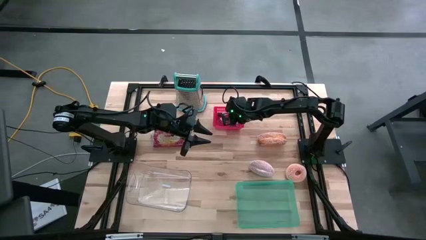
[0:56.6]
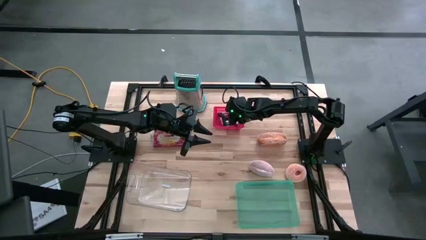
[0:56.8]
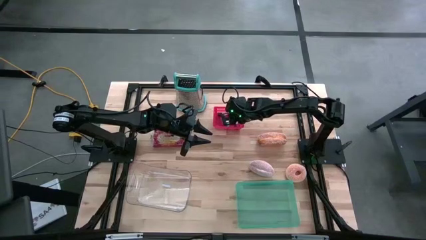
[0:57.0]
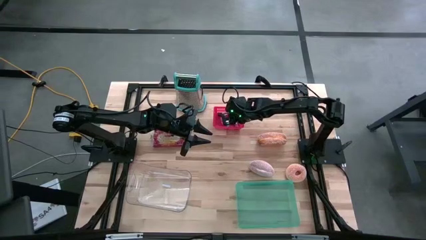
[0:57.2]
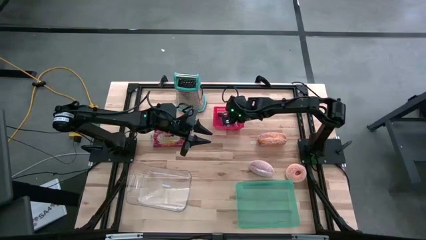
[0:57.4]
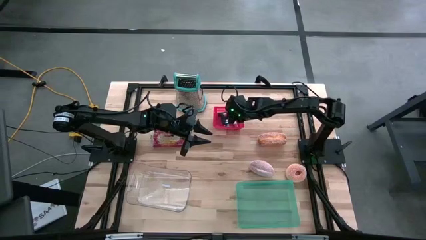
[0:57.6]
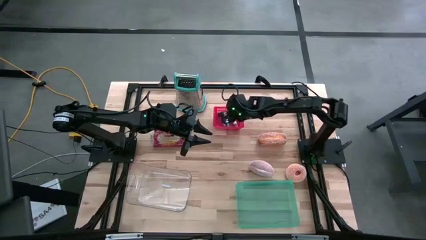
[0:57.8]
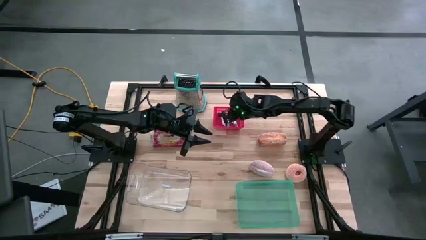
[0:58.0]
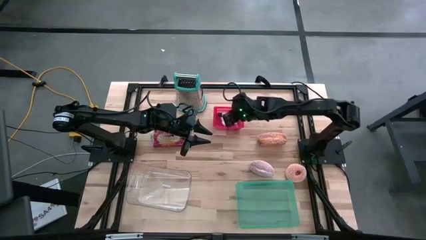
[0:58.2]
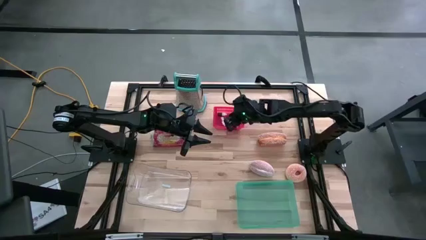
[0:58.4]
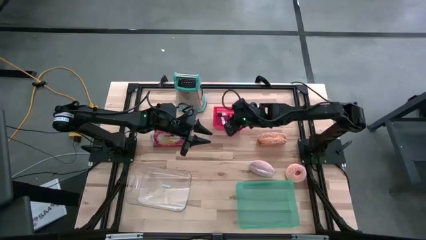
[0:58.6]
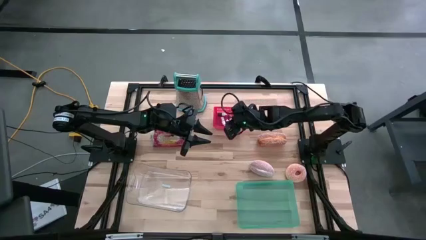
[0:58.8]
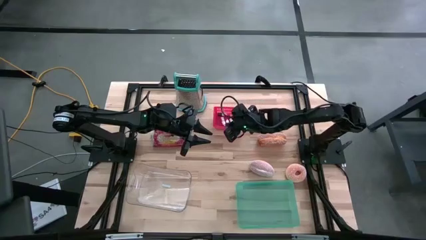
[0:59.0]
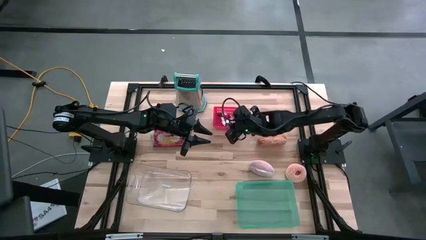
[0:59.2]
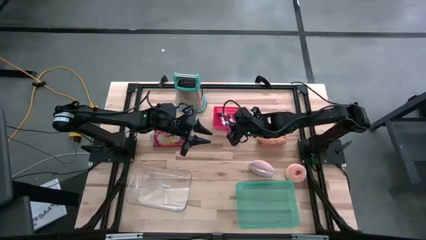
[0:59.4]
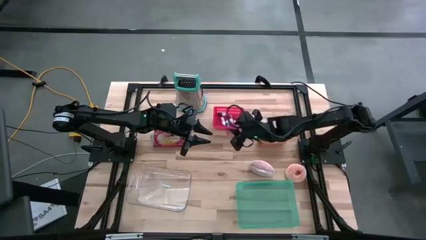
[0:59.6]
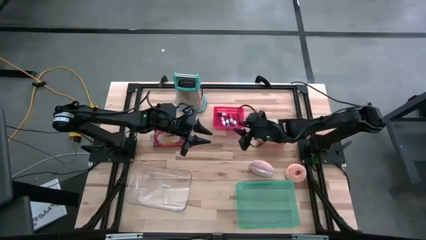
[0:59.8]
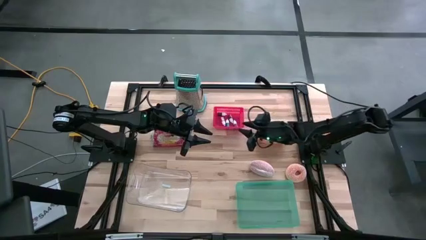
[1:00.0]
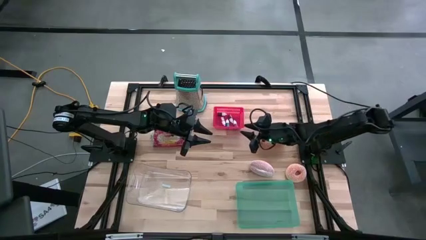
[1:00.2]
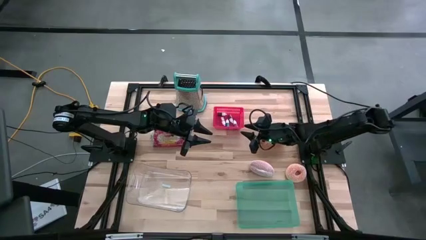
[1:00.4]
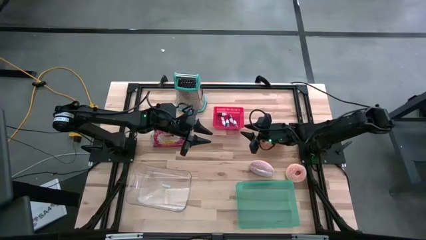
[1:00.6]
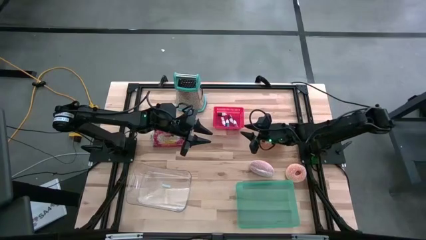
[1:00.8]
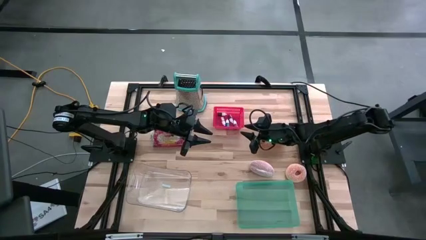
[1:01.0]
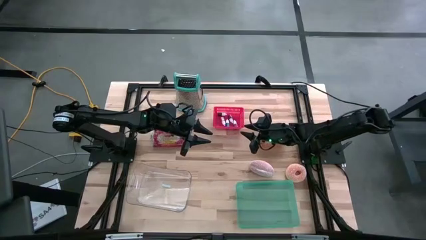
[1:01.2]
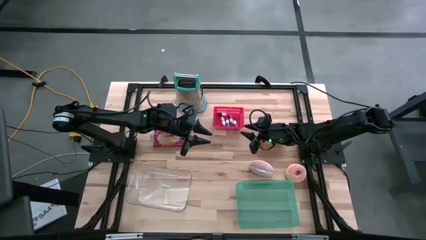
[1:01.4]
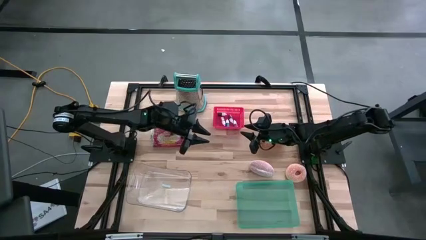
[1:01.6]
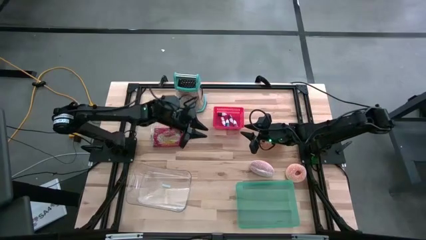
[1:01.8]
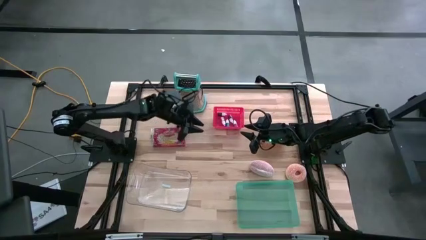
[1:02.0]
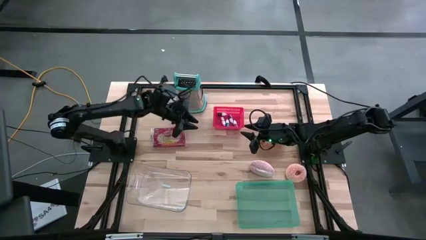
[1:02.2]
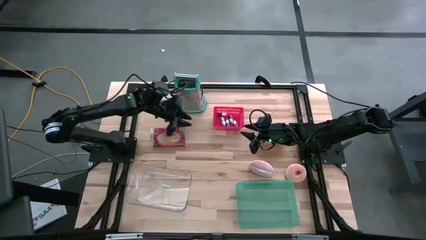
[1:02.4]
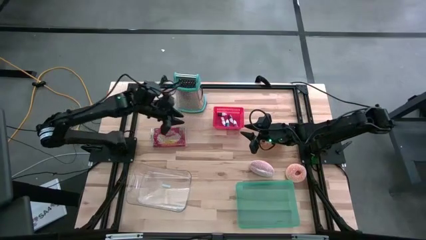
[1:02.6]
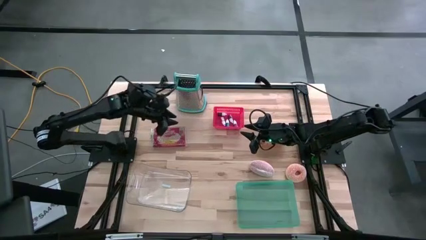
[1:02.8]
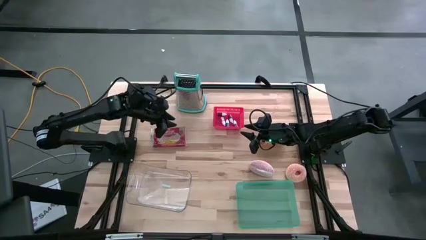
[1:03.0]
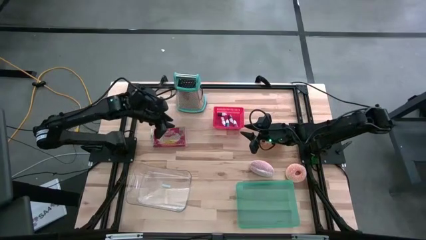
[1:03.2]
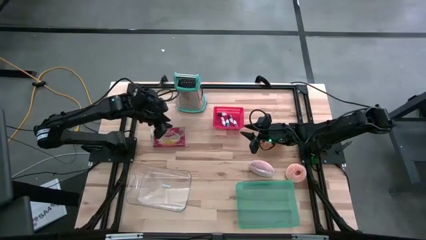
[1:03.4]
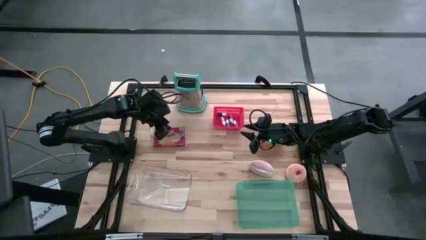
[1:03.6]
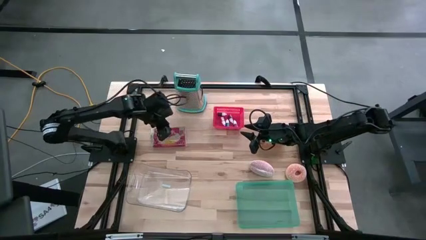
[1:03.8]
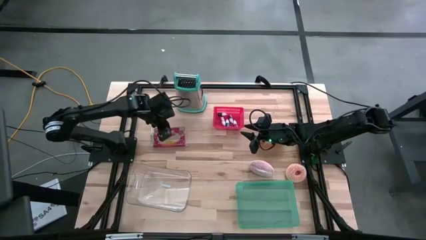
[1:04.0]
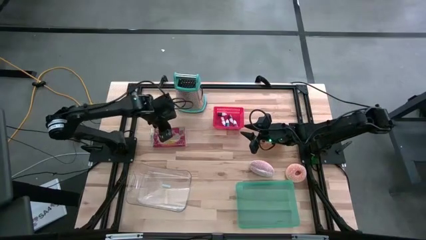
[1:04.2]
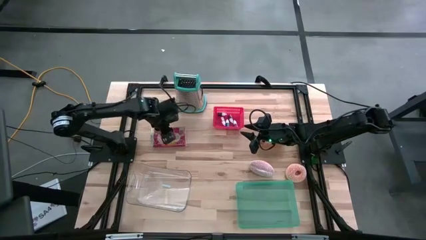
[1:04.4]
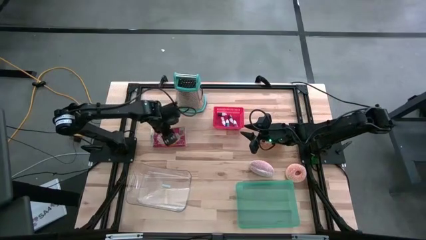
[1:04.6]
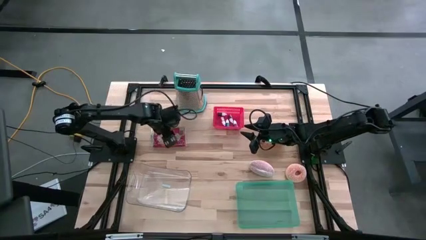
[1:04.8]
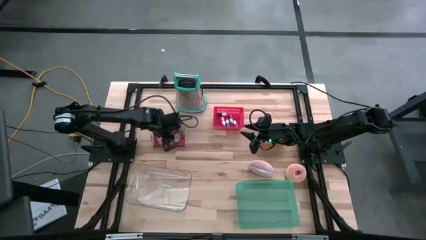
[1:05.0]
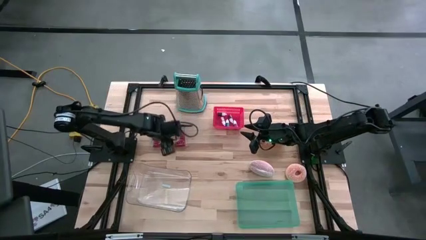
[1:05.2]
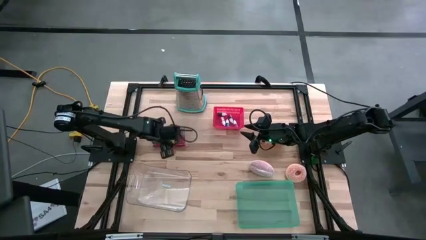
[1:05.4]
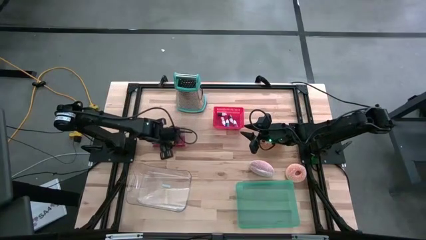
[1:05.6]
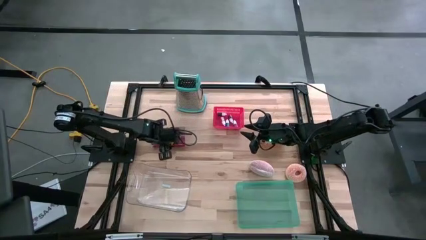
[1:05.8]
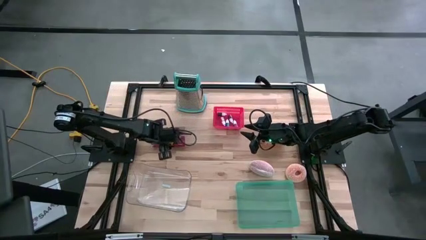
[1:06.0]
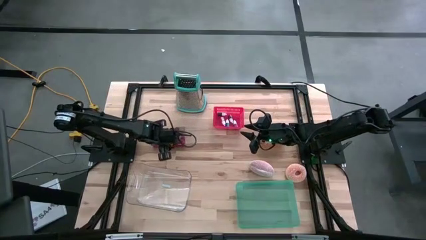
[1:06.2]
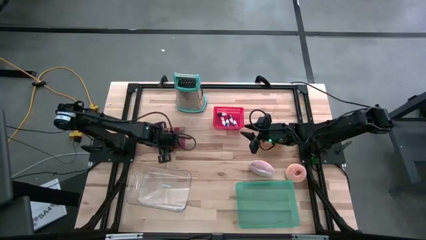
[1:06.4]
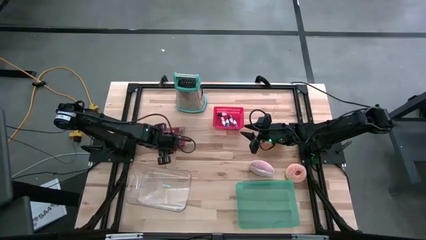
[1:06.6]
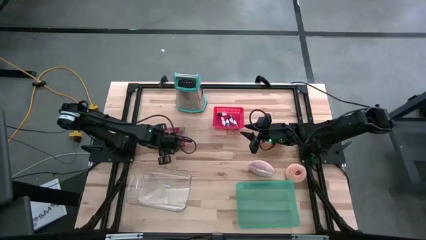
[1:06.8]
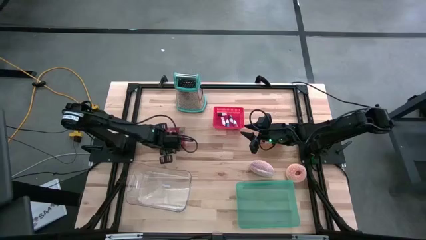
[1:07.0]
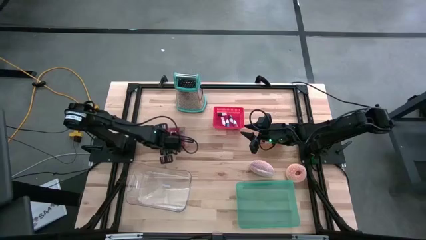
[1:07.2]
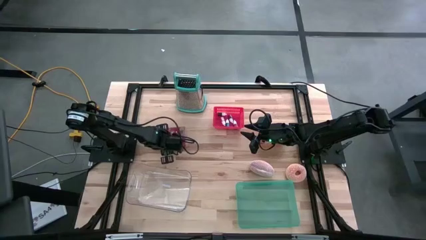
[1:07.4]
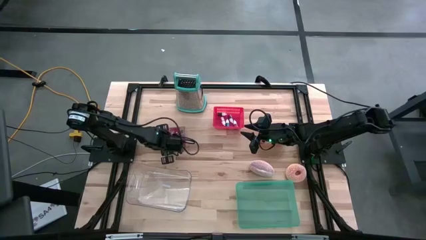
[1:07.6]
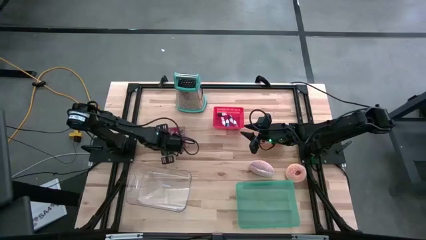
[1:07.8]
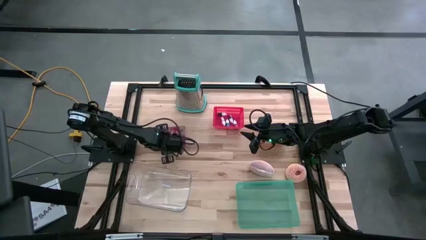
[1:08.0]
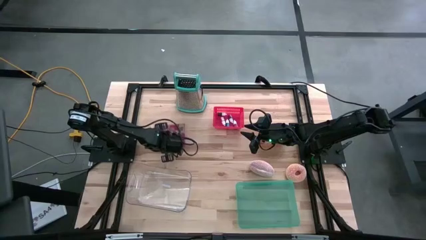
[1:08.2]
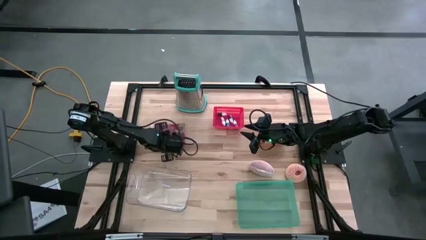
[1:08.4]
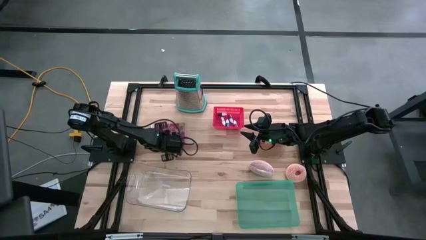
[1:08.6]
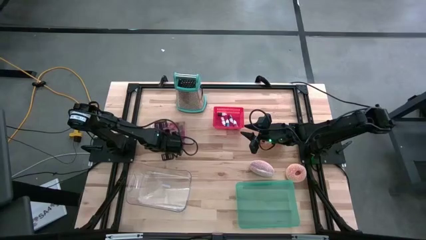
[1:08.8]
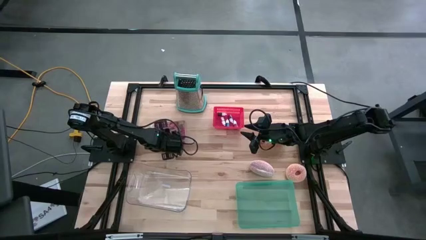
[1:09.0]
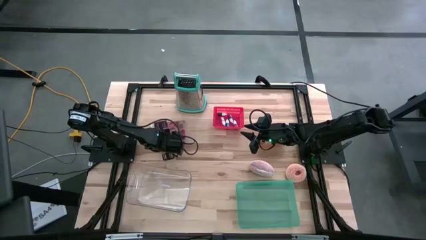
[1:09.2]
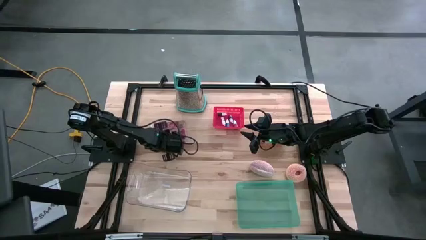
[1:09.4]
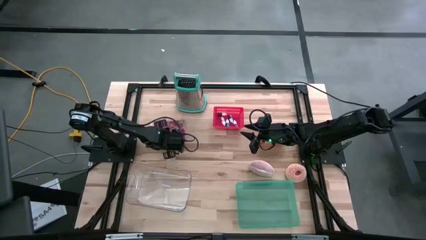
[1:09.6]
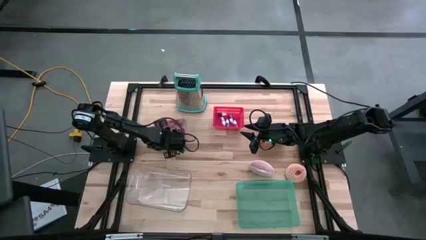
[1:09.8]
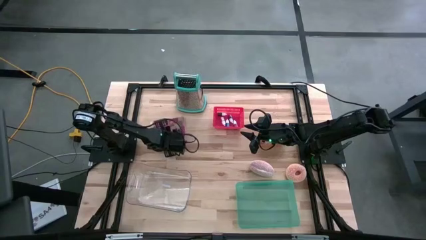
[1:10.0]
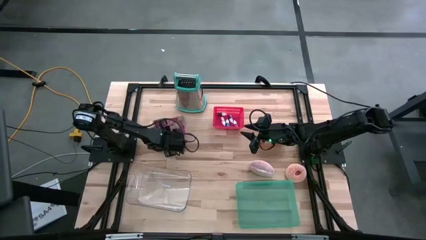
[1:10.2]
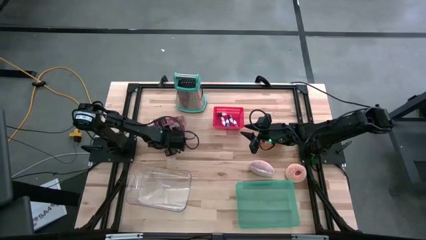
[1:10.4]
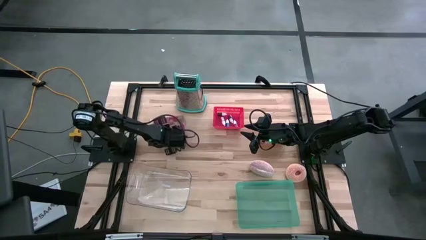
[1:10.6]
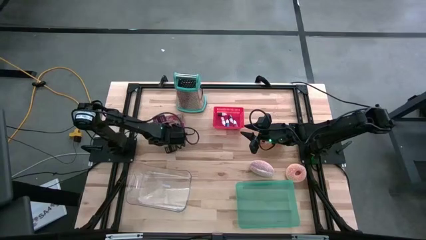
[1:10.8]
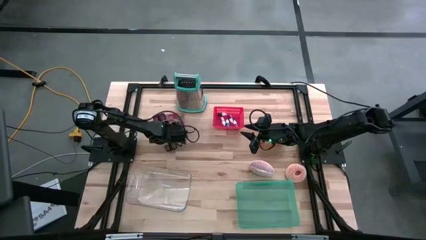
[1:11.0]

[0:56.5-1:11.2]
Put the popcorn bag into the green bin
